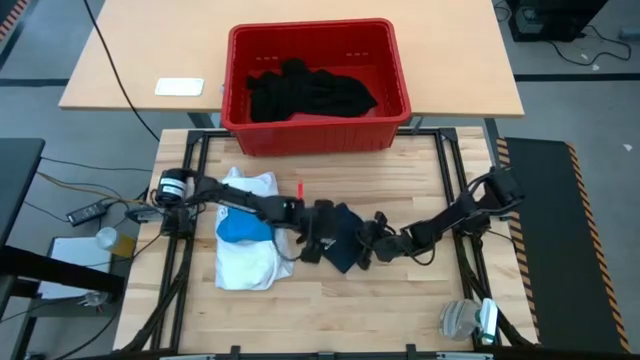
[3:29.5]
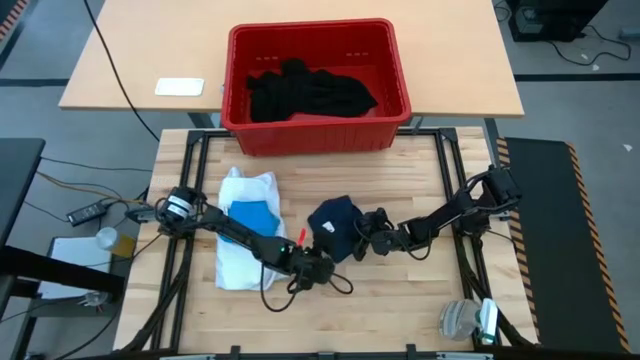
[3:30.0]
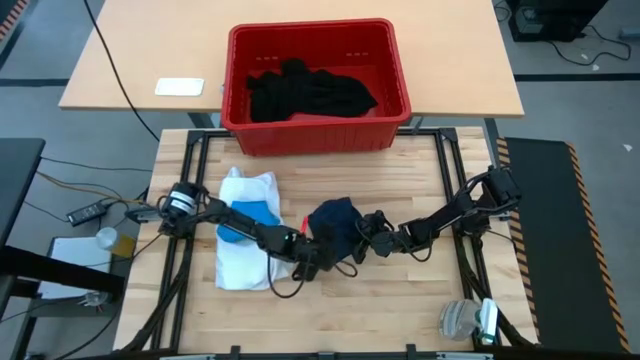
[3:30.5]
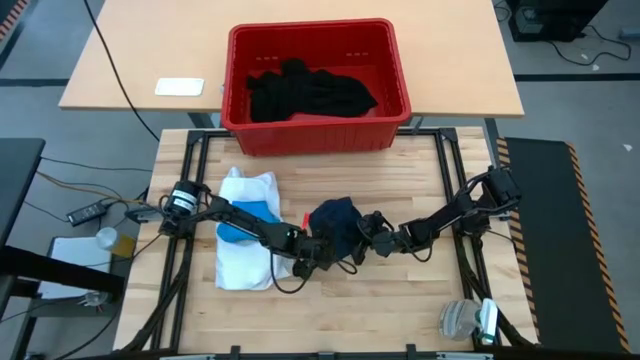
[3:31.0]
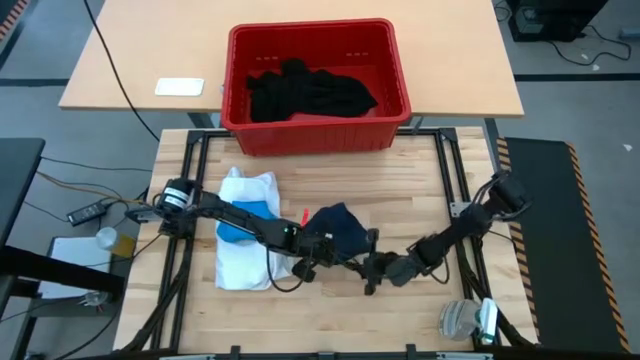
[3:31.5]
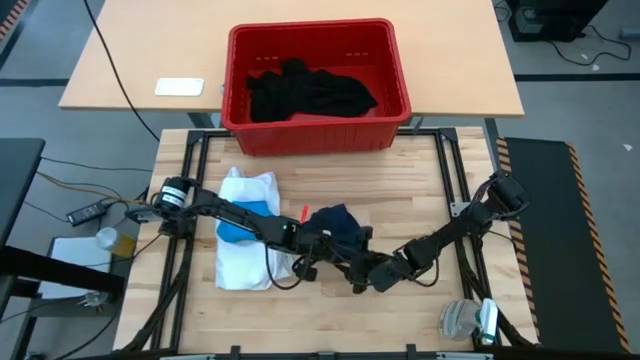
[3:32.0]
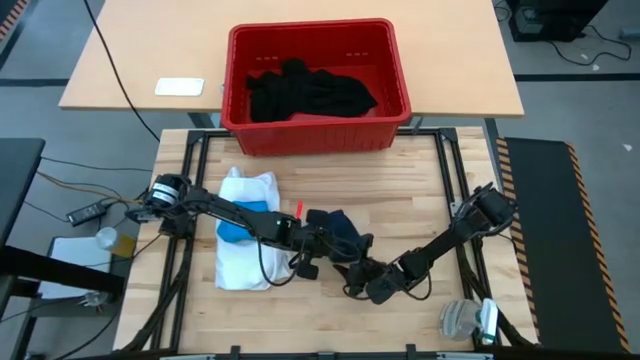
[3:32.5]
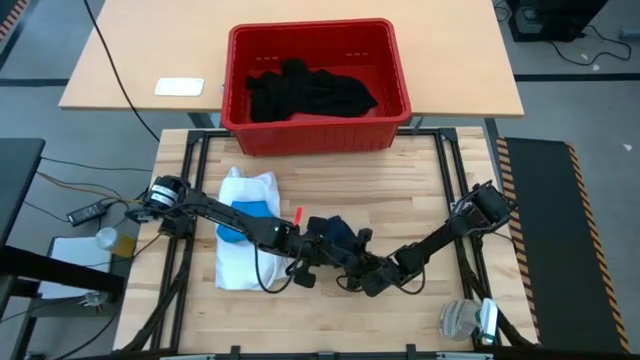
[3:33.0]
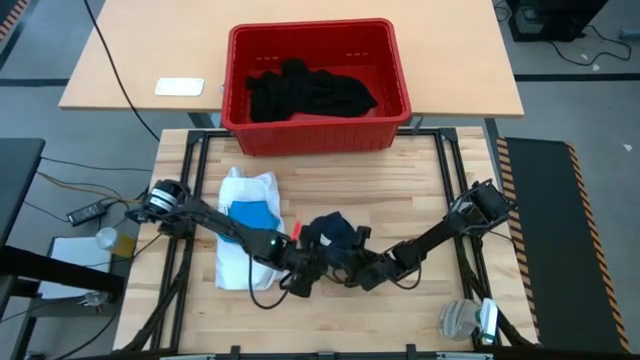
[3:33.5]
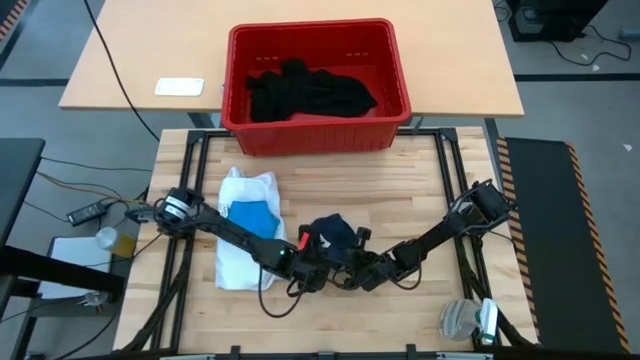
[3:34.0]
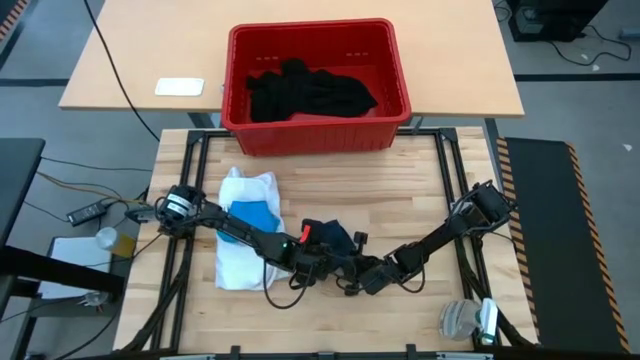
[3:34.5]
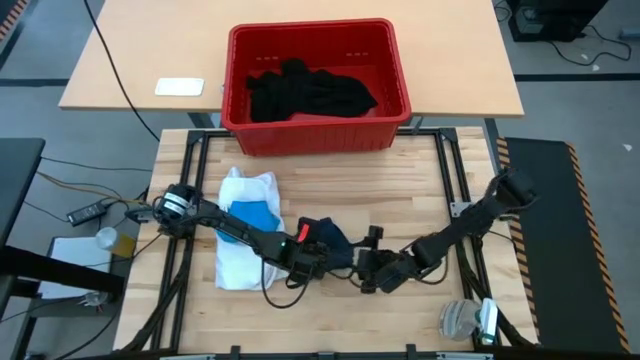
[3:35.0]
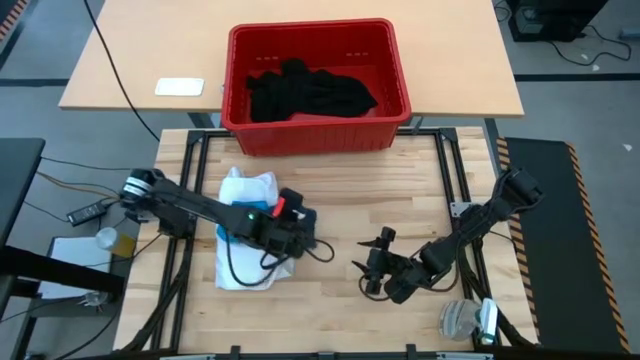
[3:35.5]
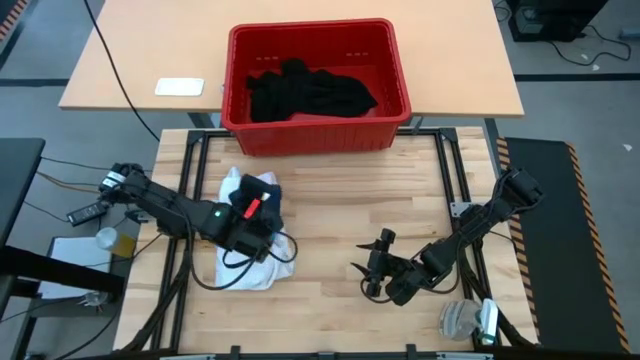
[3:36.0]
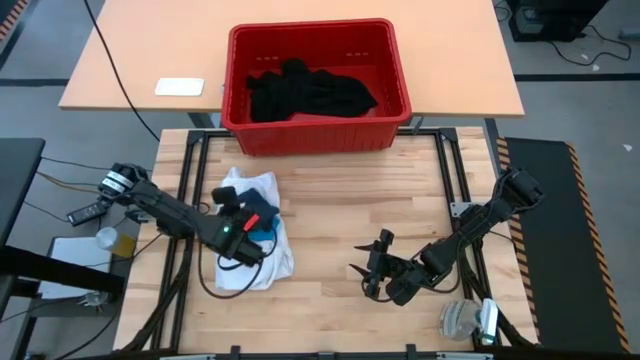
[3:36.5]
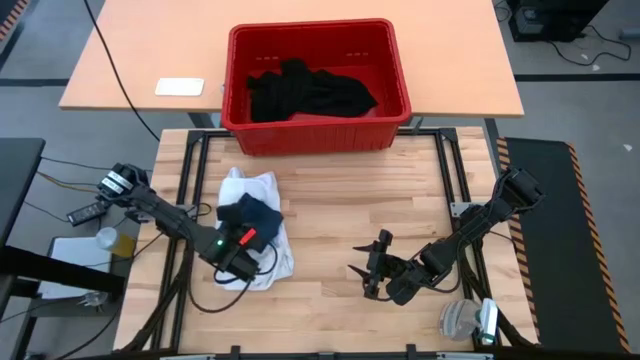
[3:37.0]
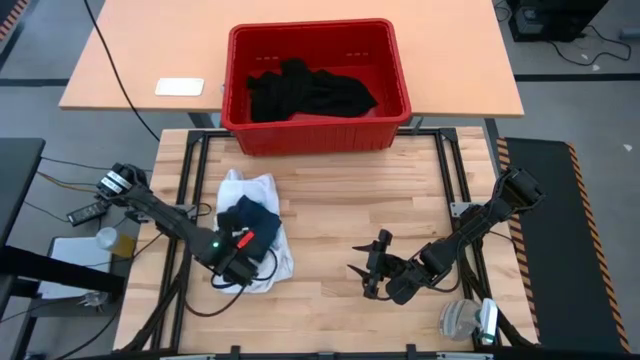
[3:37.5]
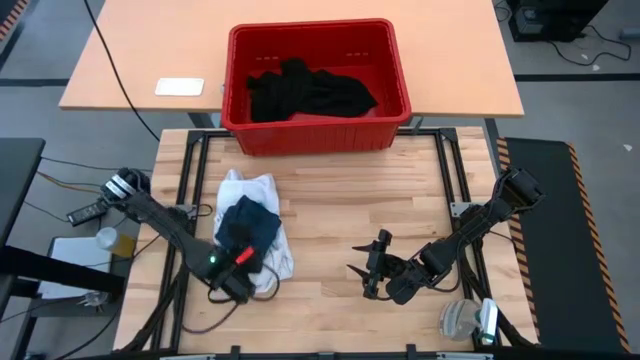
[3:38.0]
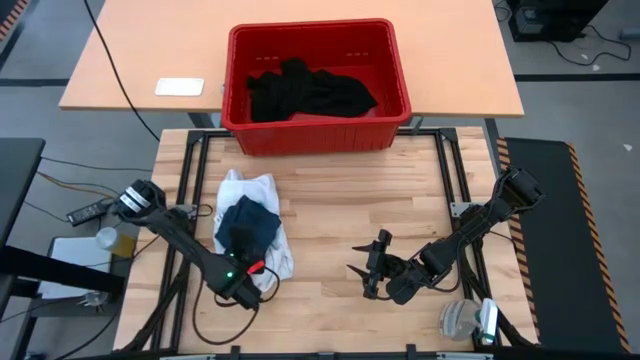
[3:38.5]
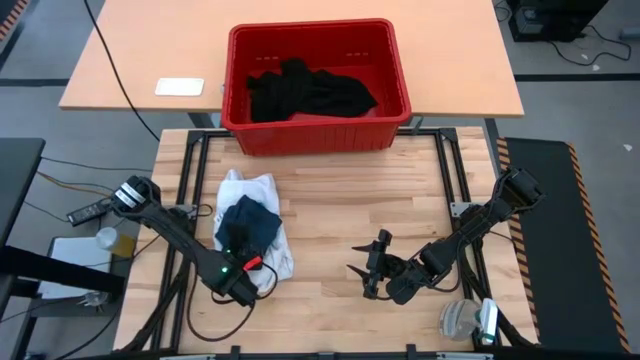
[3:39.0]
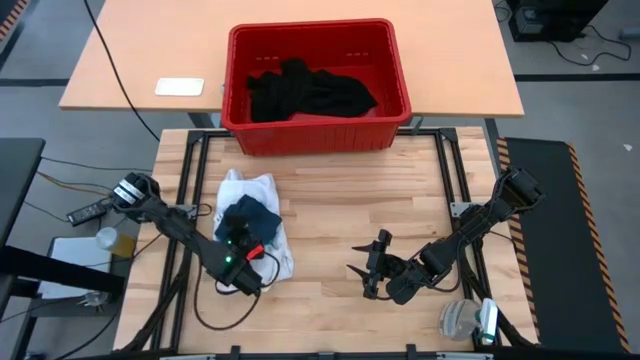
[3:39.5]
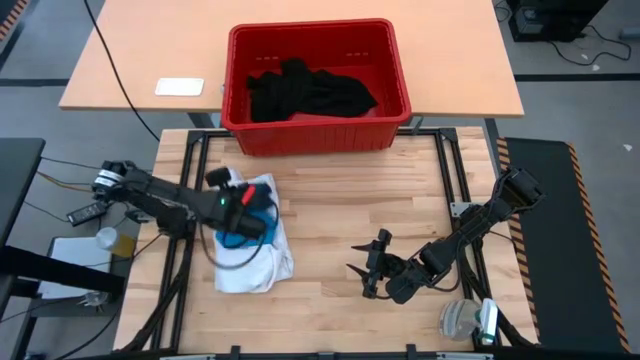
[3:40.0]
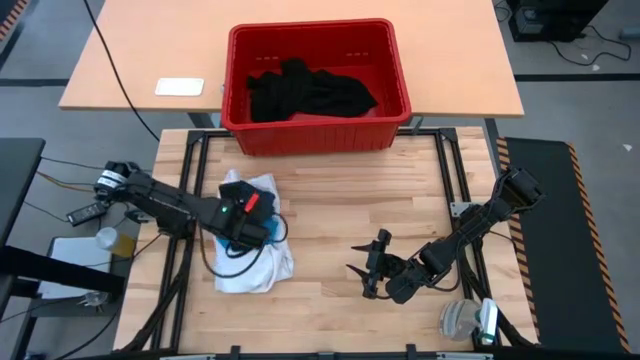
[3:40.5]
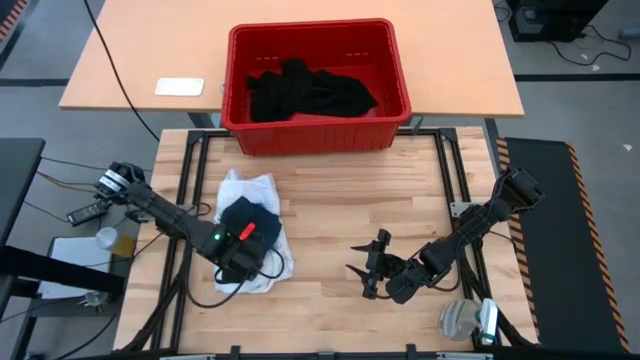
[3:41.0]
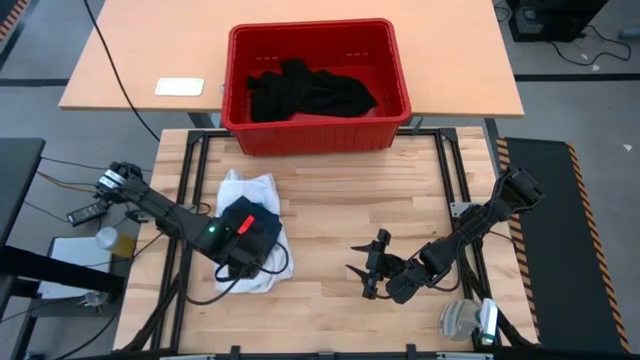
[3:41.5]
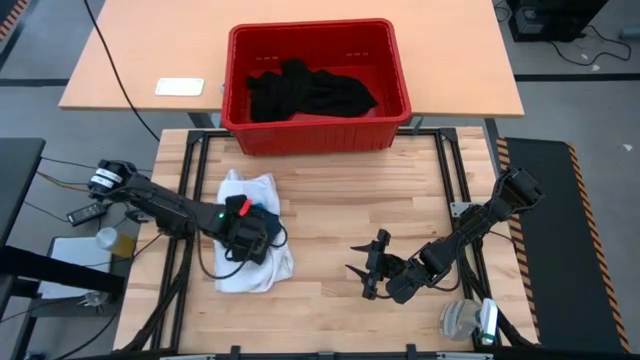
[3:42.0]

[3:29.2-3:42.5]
Task: Fold laundry
Stack the folded dark blue underwear on top of the folded blue underwear

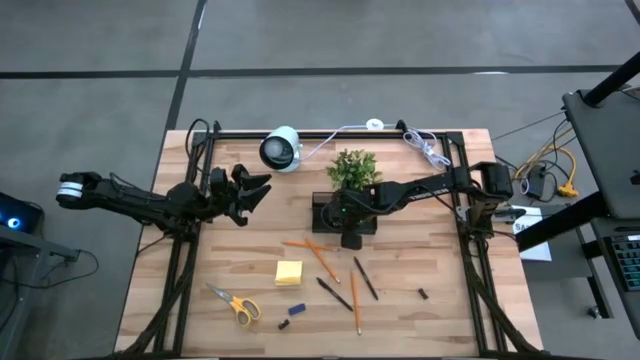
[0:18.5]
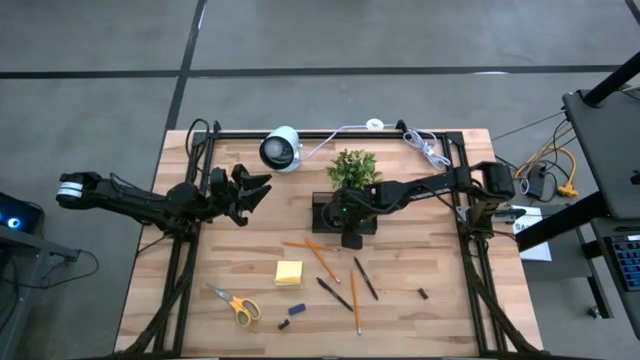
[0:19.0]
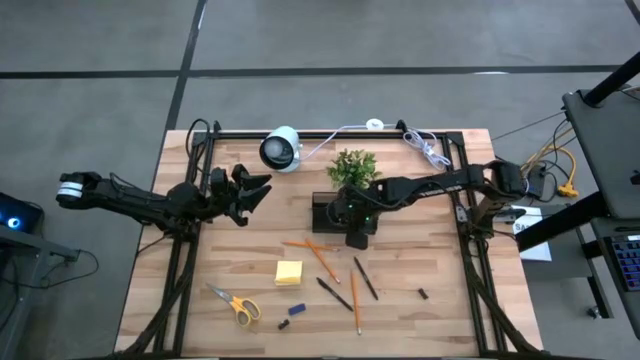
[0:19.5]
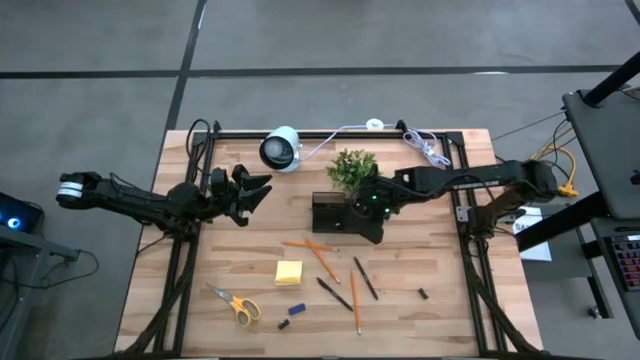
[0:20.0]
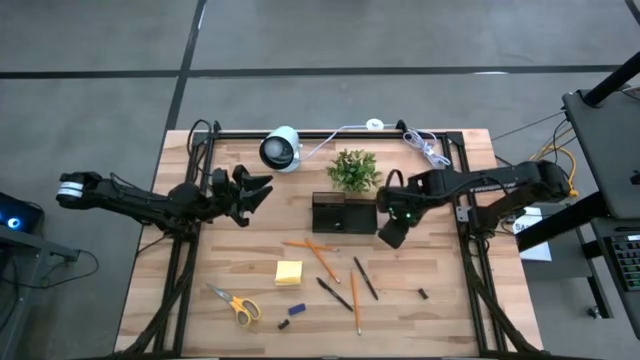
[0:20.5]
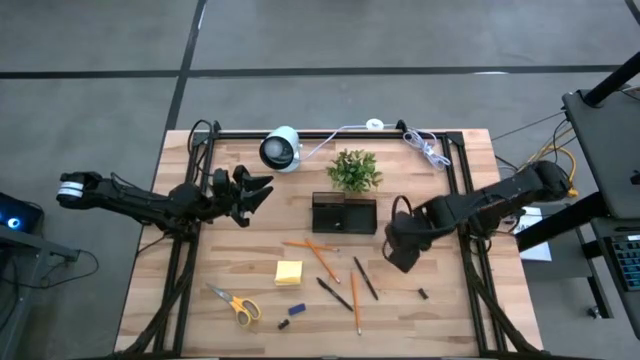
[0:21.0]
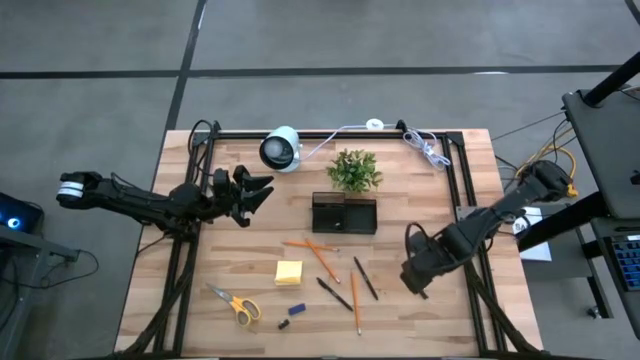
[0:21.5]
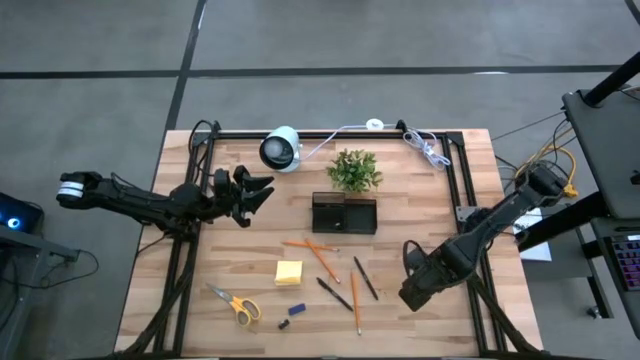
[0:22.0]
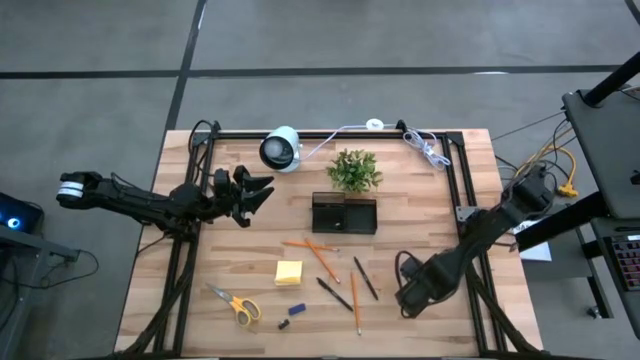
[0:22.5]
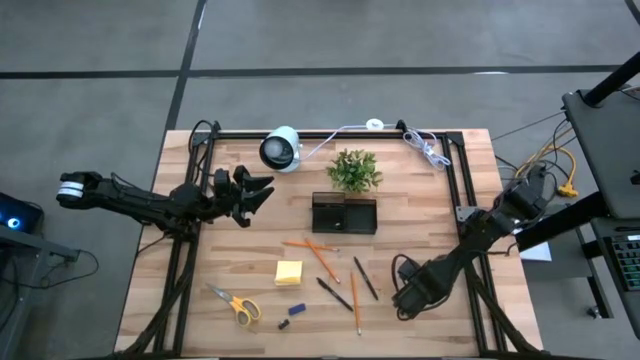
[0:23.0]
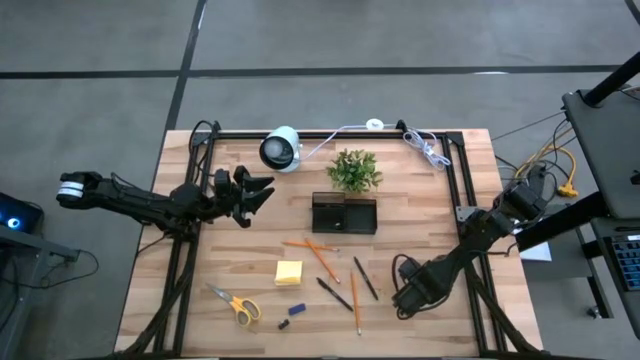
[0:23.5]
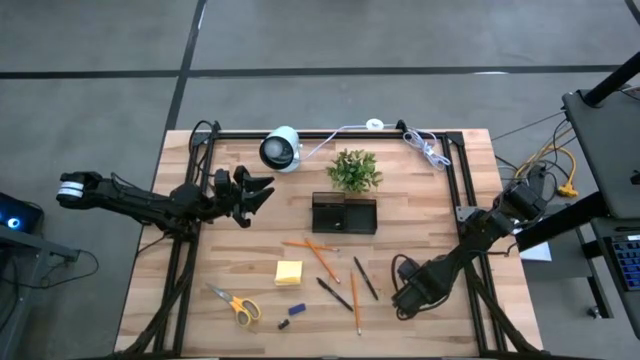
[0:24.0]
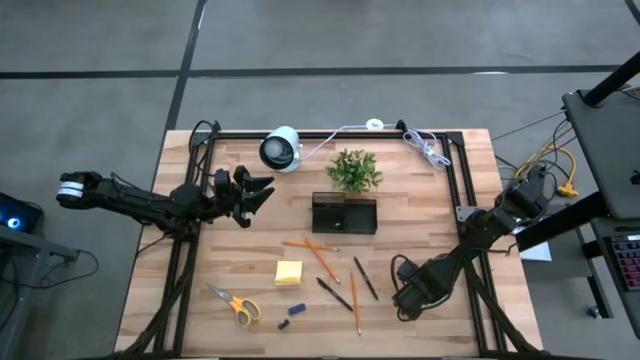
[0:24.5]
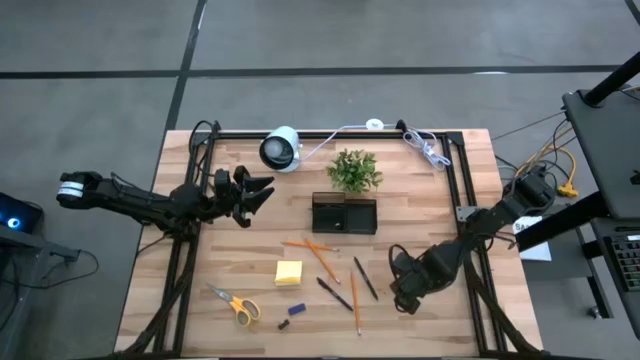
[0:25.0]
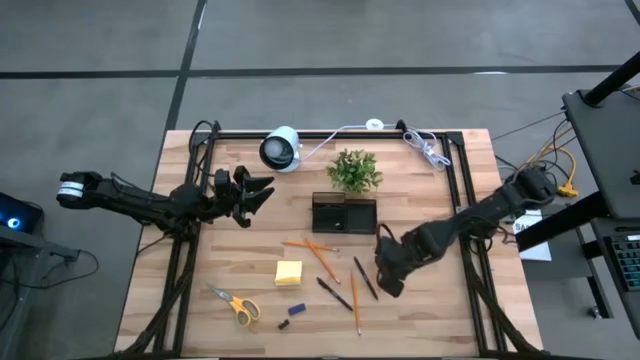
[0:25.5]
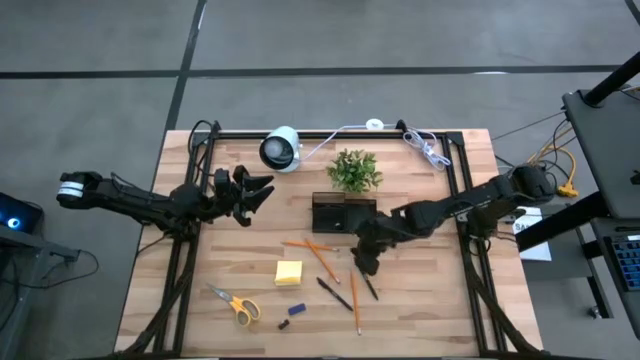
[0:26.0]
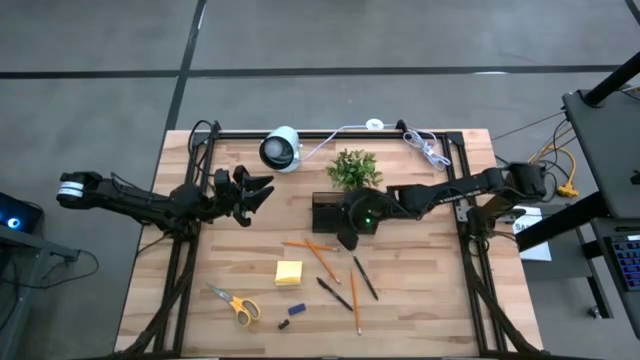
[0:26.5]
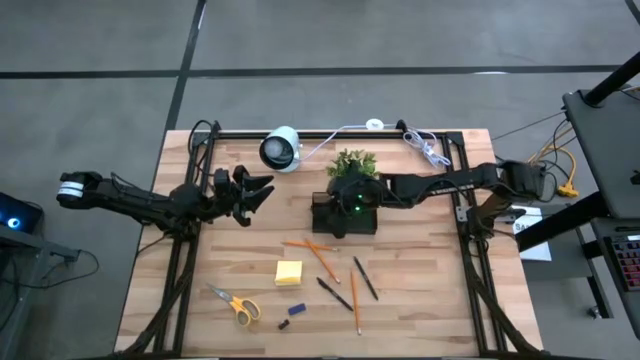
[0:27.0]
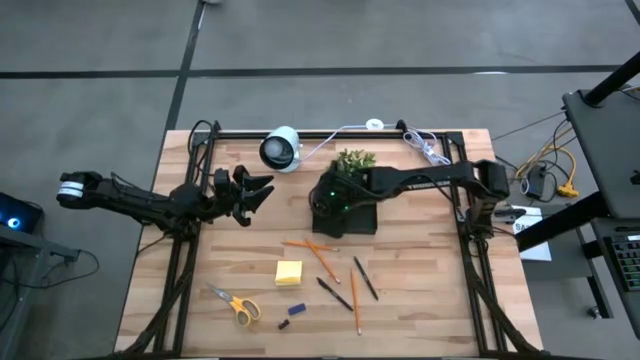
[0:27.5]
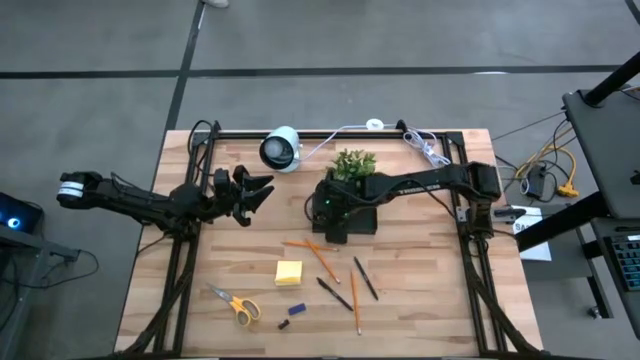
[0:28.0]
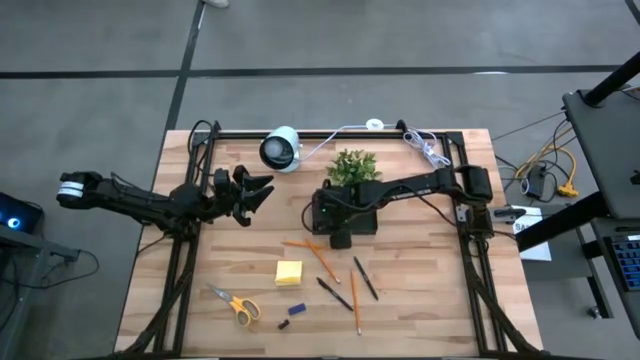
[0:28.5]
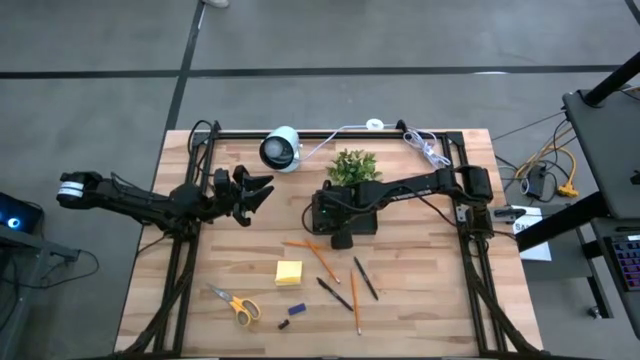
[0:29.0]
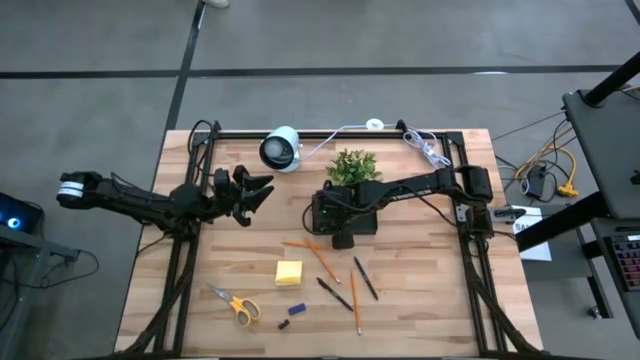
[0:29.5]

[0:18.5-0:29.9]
Task: Pick and place office supplies into organizer
Put the right black binder clip into the black desk organizer
